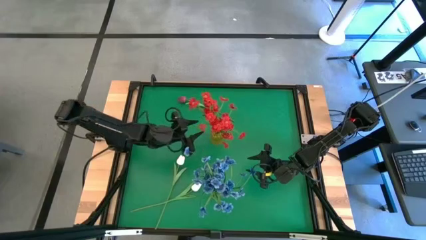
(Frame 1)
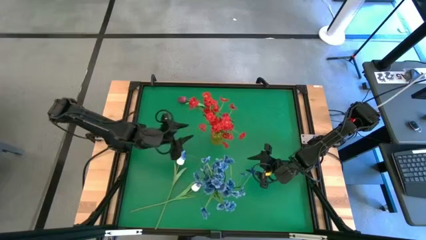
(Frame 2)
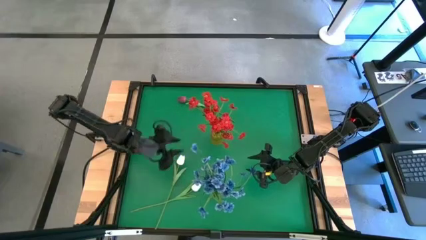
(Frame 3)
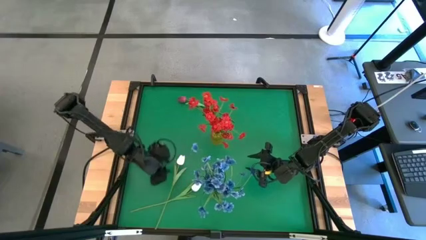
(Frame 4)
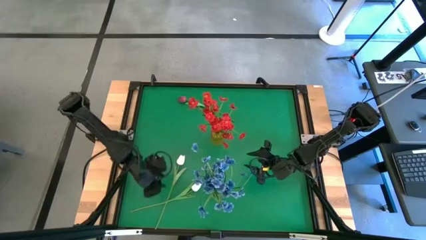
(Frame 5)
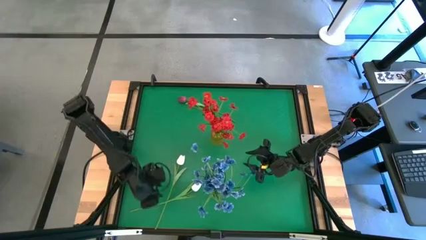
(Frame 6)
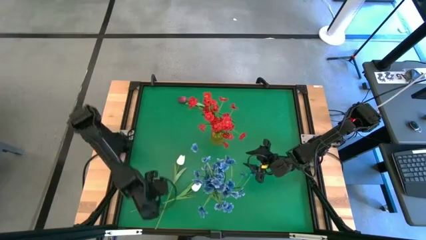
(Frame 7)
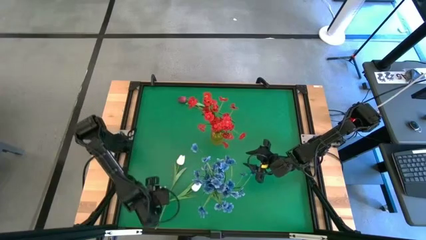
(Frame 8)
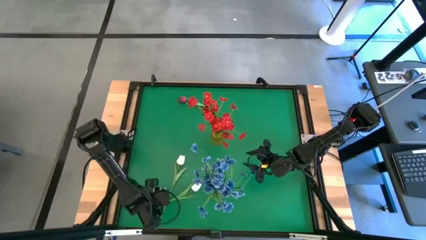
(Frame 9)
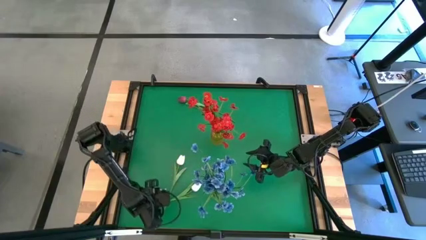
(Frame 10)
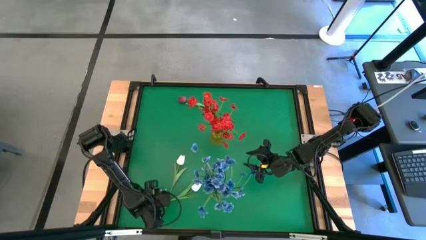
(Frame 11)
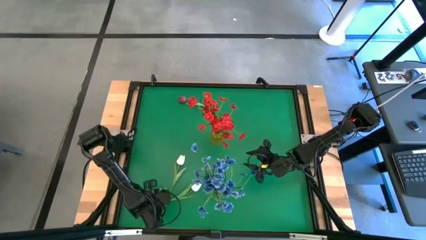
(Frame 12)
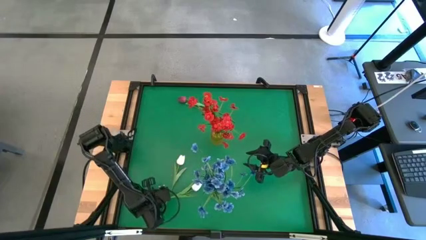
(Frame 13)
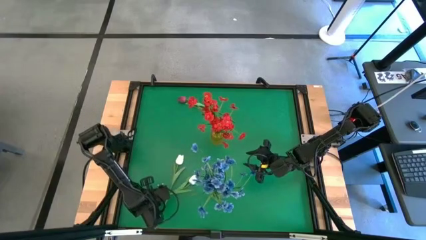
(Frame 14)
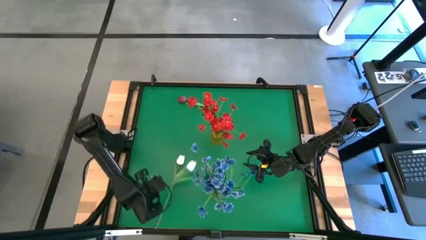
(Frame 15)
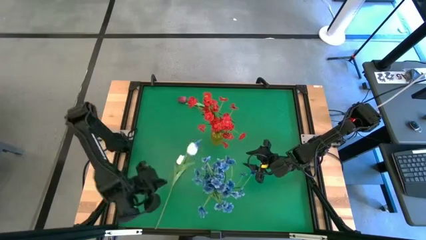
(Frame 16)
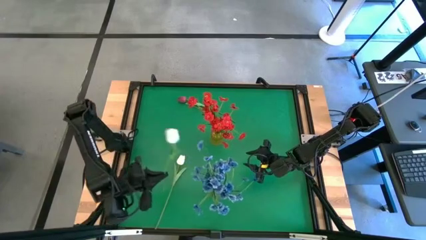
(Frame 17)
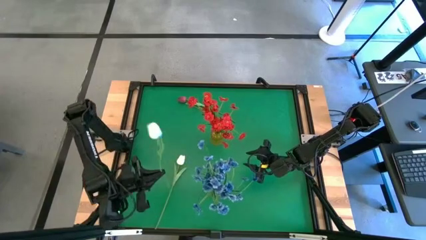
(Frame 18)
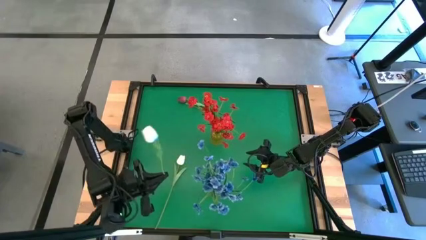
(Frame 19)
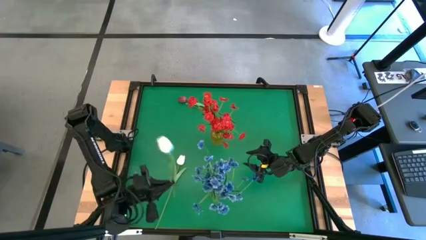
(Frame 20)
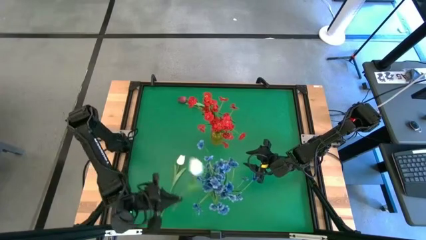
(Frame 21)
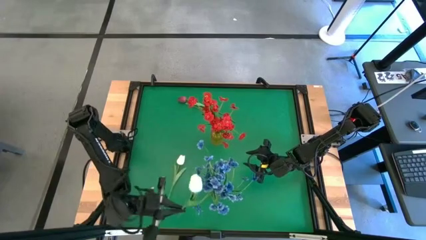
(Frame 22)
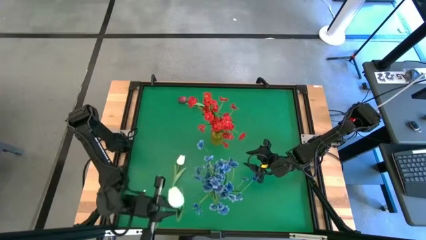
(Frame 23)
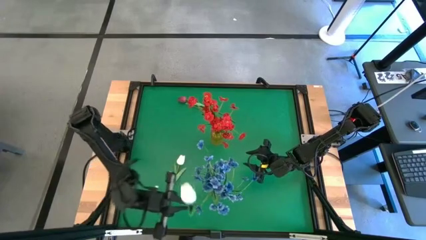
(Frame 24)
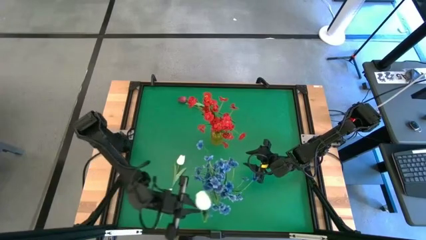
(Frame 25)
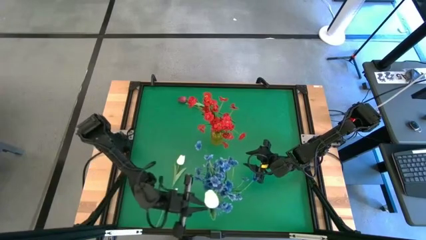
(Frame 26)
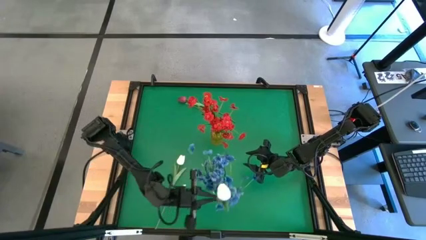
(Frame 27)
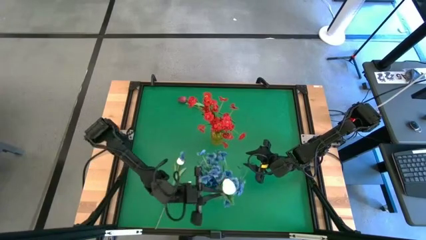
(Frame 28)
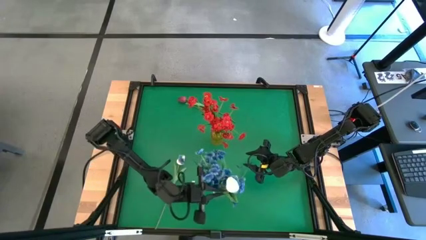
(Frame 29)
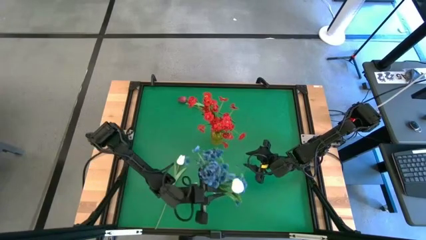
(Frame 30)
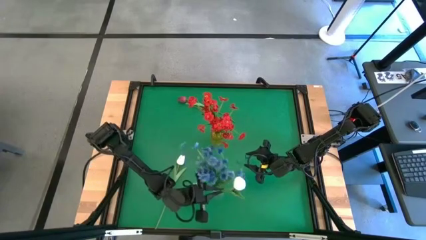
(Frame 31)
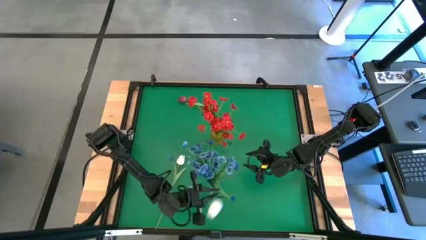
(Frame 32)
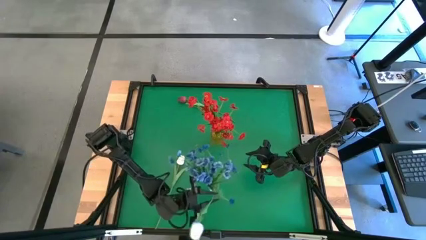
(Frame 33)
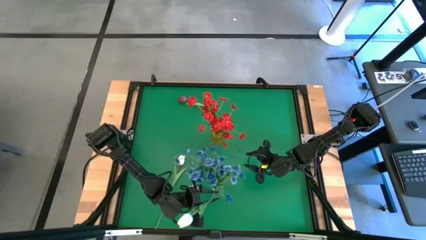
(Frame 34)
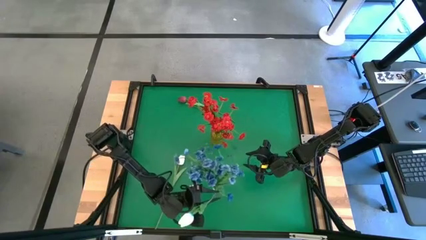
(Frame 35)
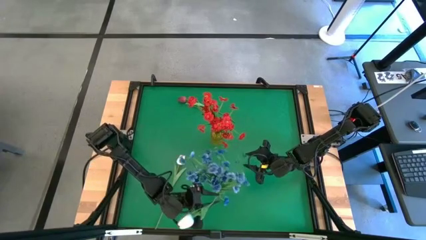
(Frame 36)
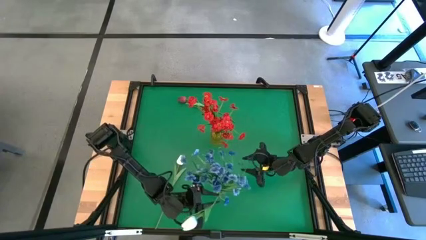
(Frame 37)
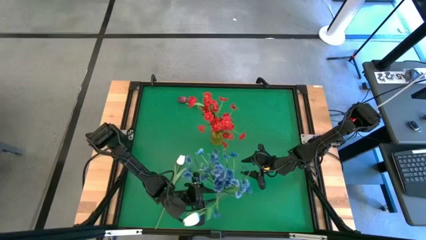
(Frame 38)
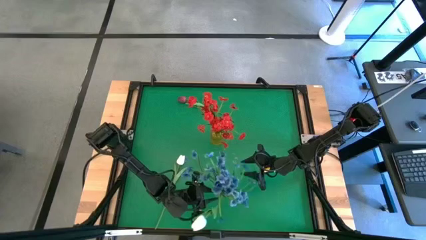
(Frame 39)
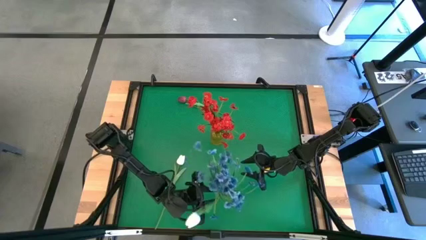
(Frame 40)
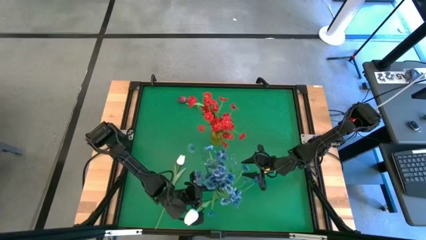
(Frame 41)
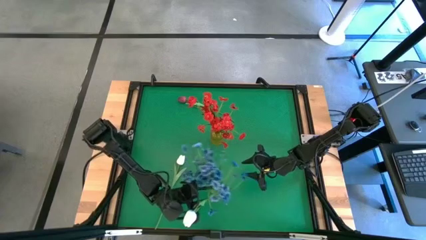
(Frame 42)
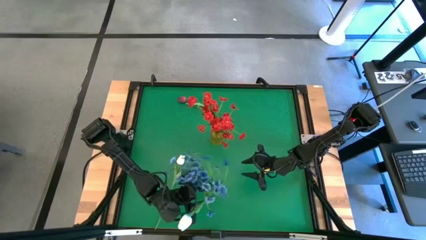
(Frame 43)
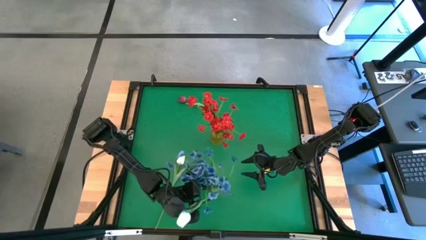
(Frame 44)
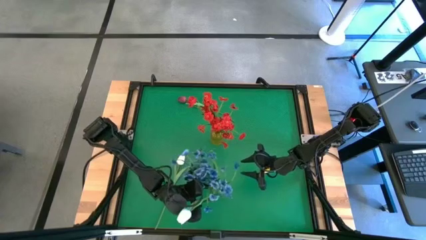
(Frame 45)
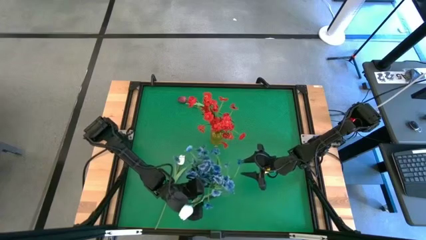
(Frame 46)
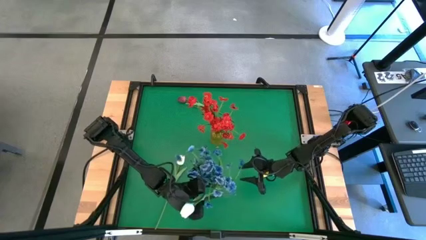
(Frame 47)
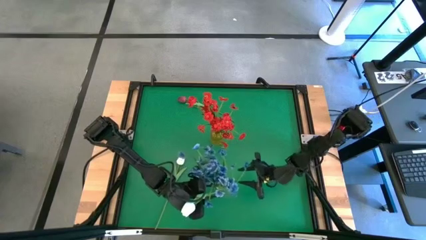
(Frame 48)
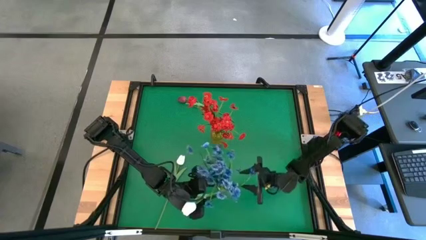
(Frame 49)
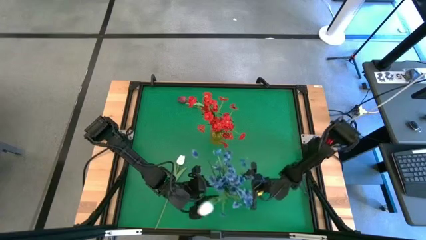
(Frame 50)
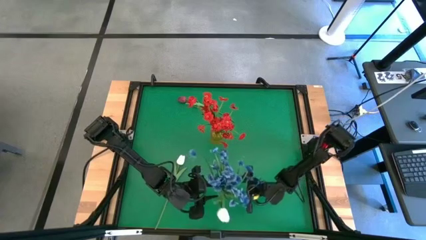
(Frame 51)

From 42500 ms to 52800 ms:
Task: Sort flowers into vase by color
Put the bottom white flower into the transparent vase
